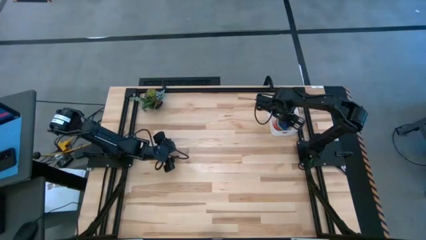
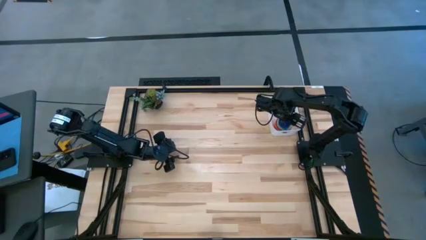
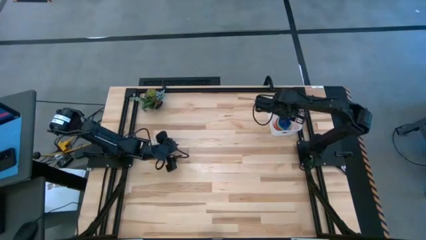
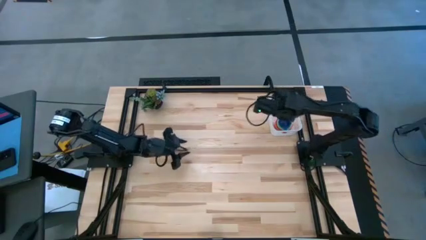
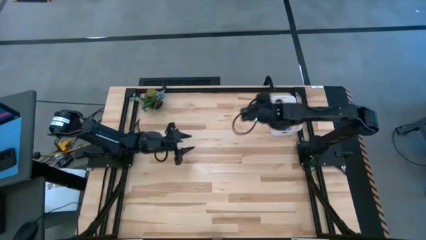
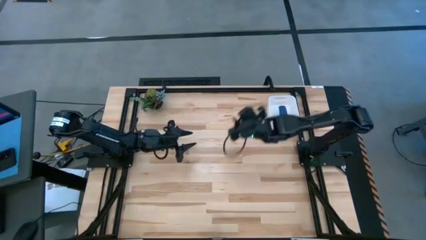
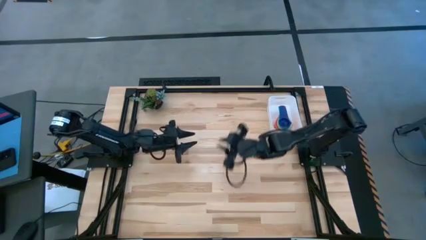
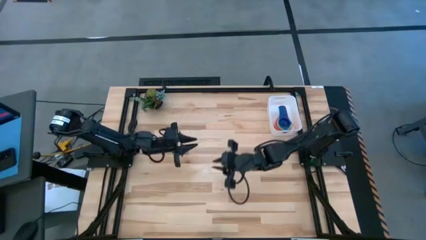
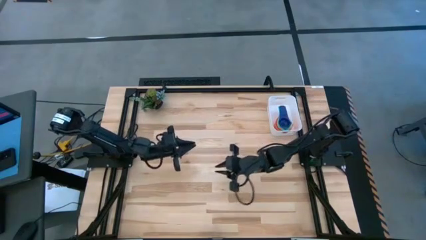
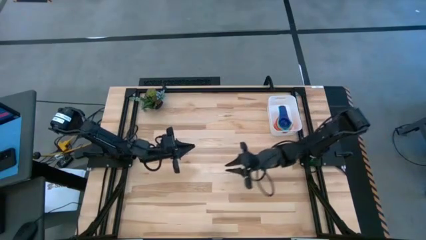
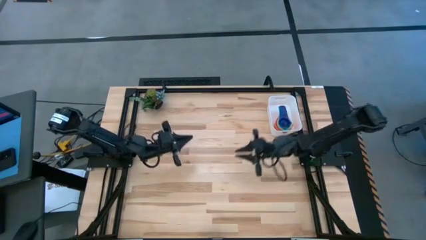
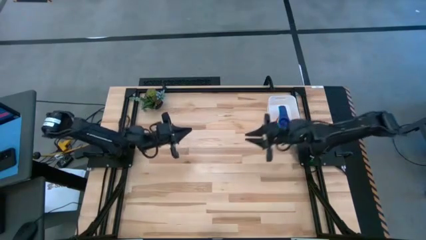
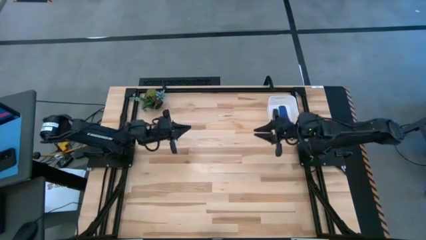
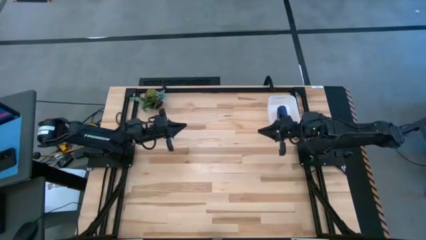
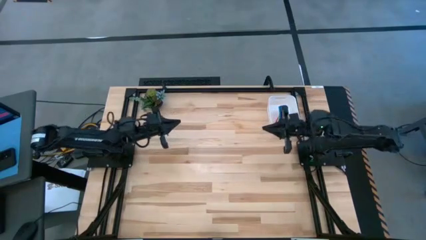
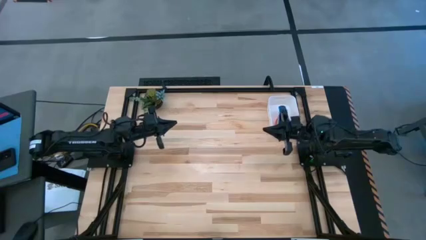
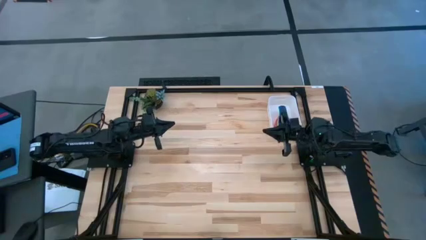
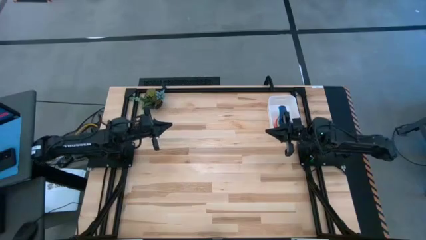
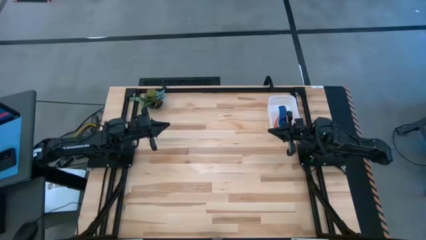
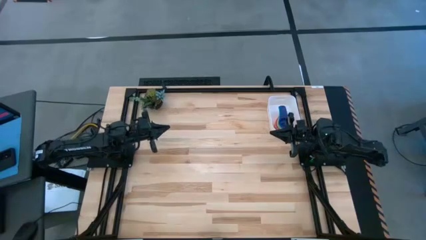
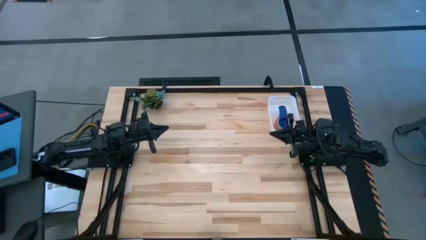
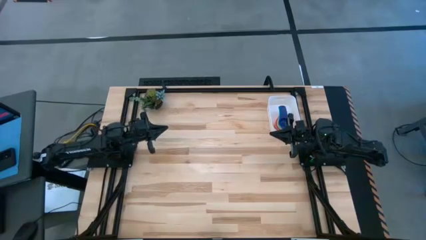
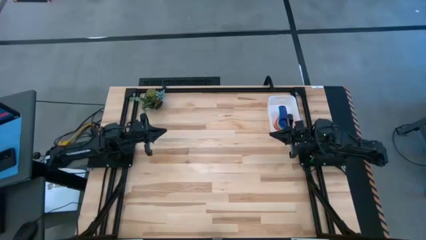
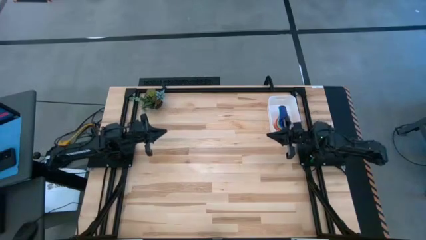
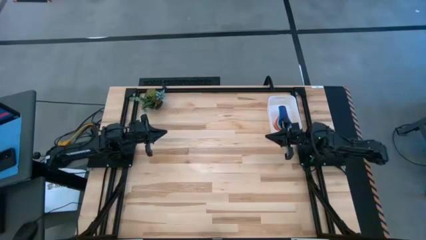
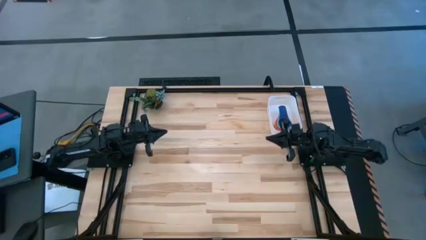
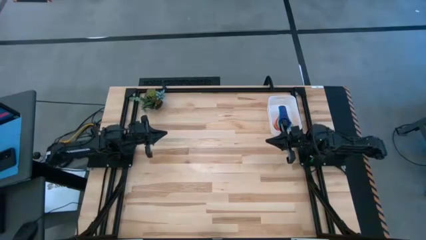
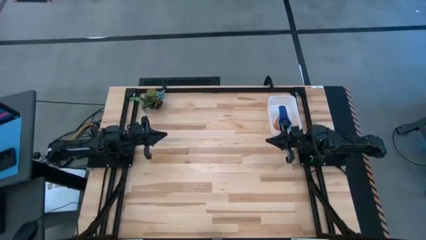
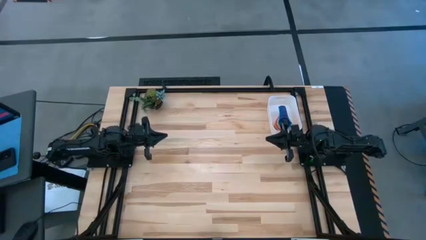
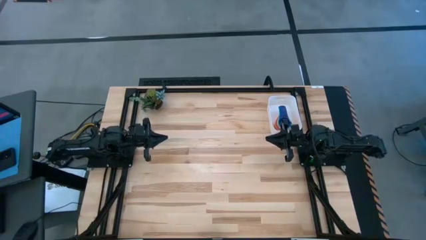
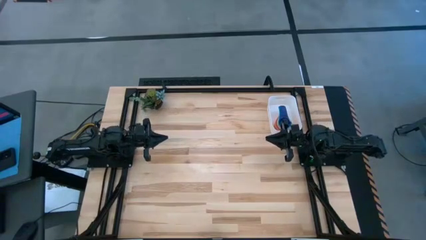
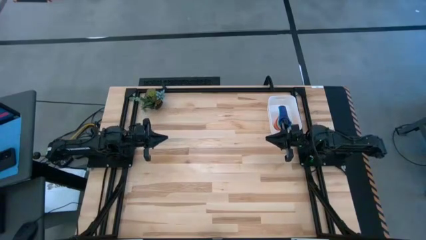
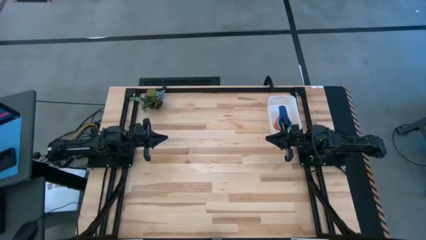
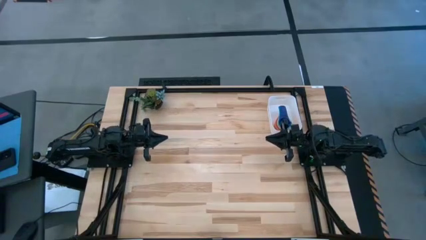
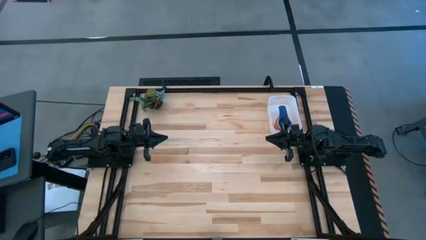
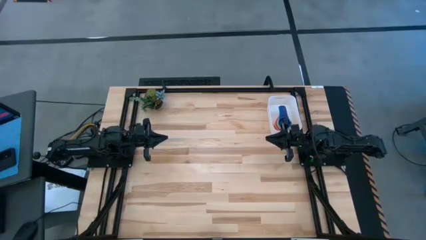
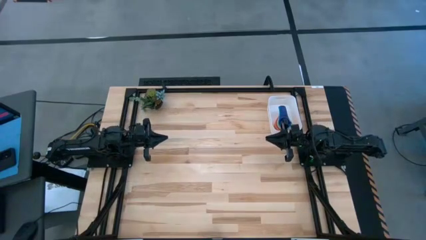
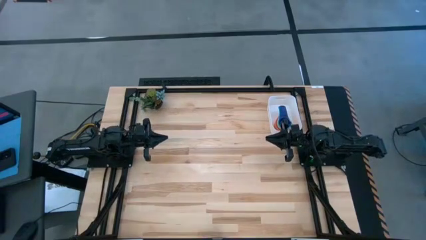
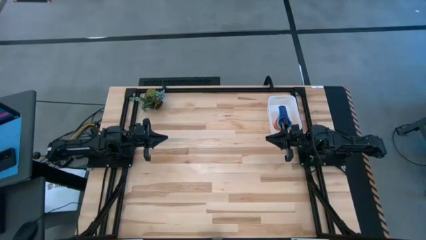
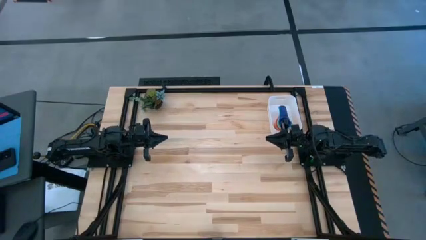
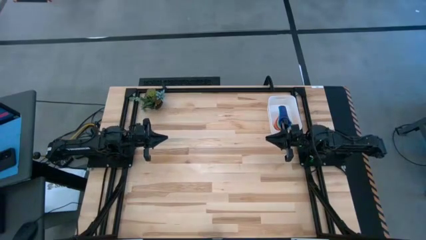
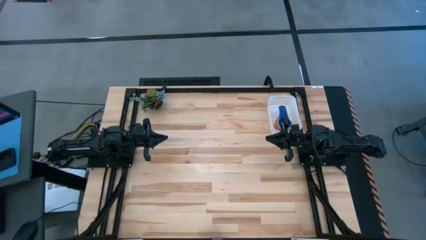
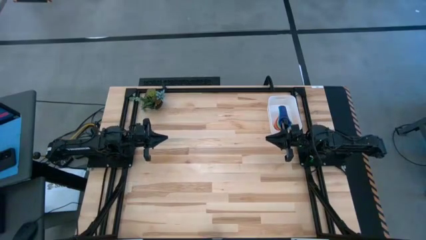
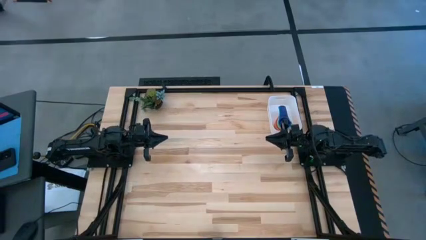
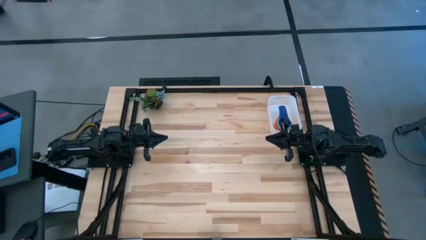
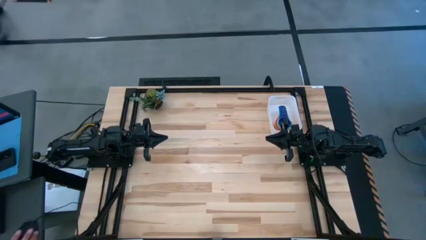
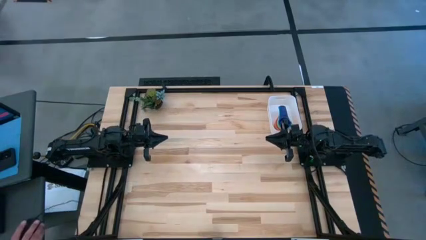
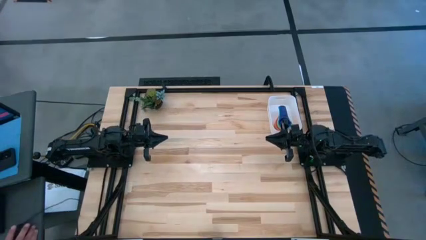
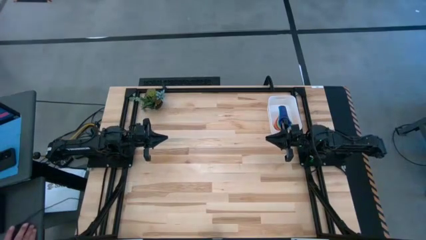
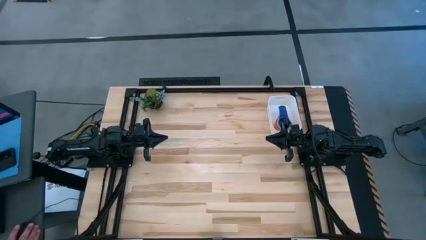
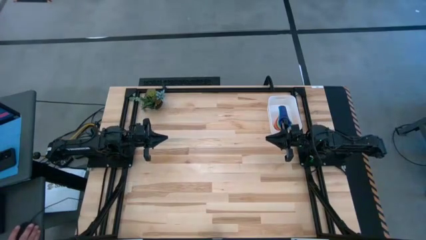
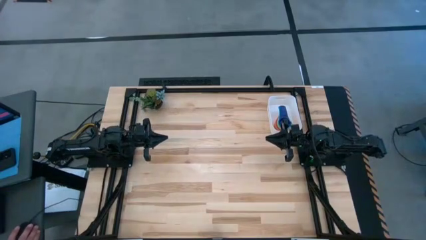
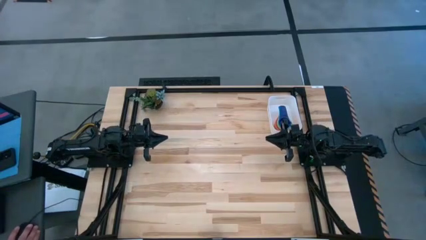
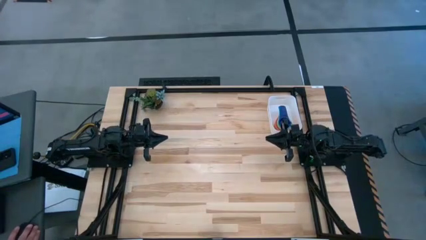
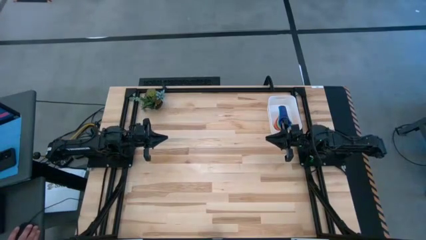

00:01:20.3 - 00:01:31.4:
Task: Nest measuring cups in basket
Return to Home Position

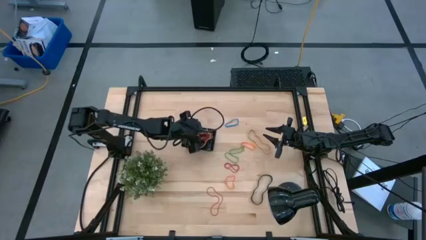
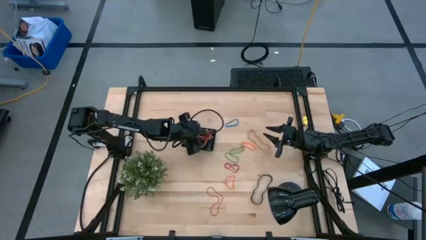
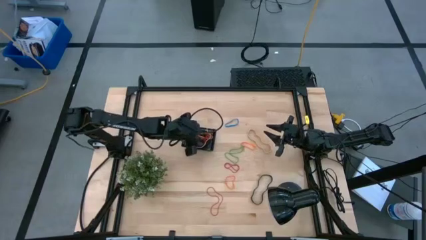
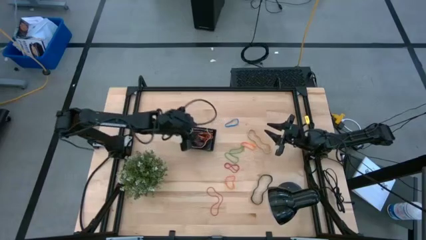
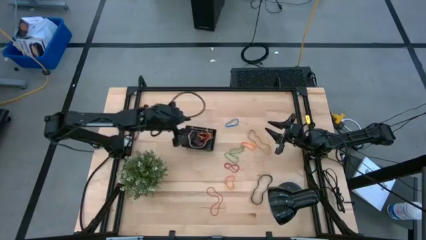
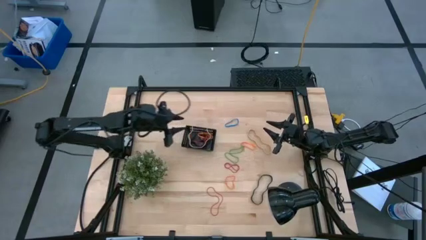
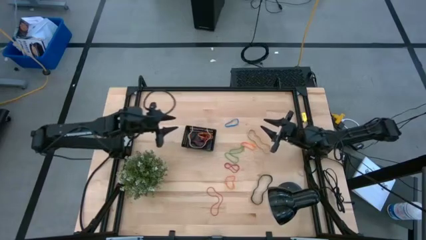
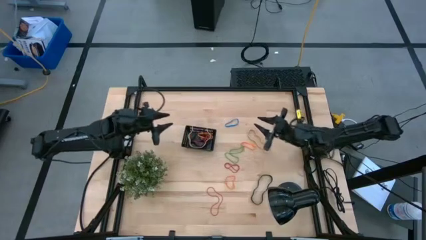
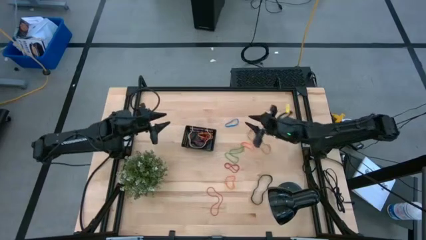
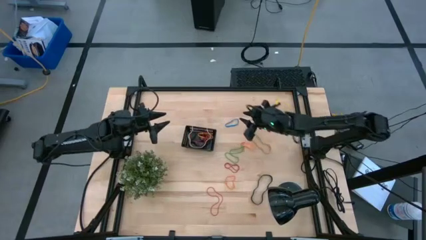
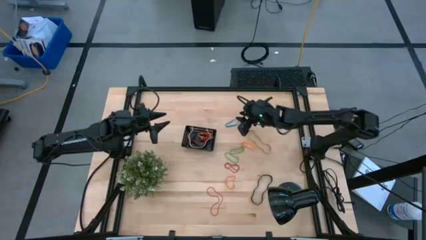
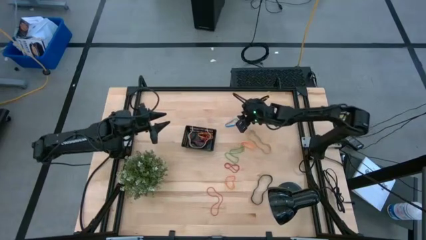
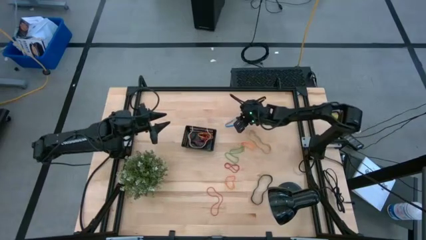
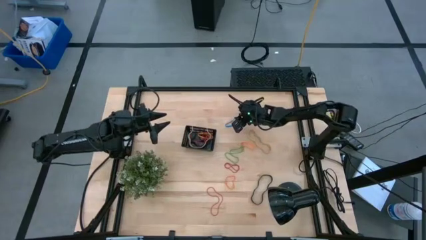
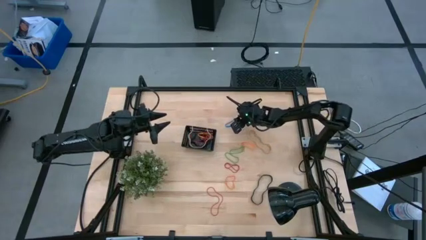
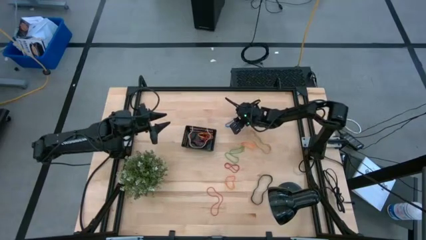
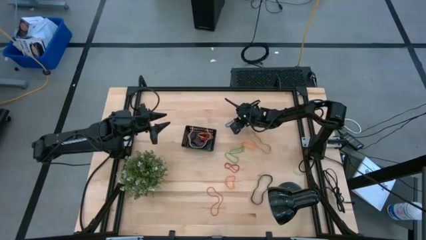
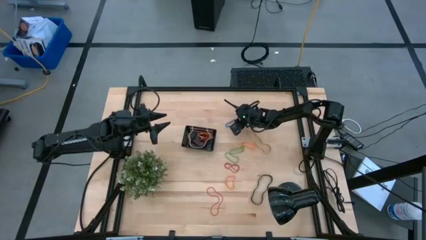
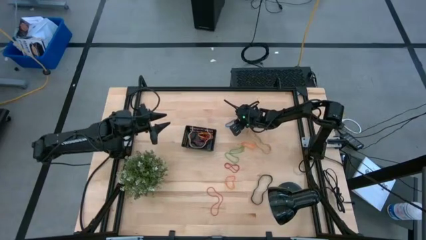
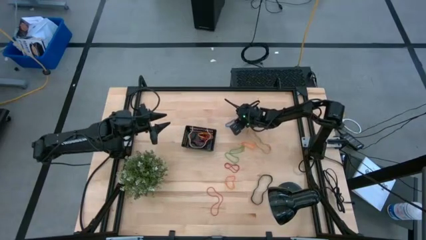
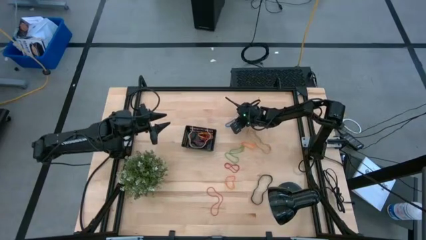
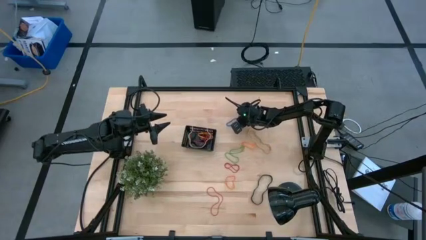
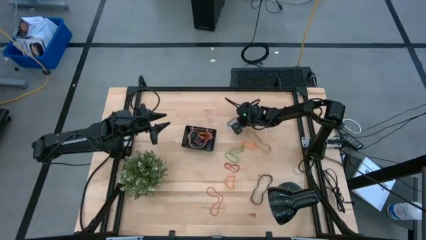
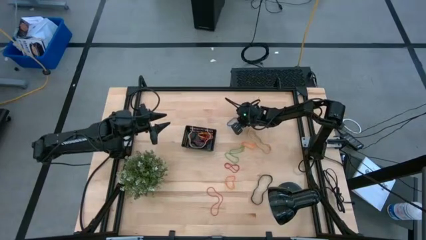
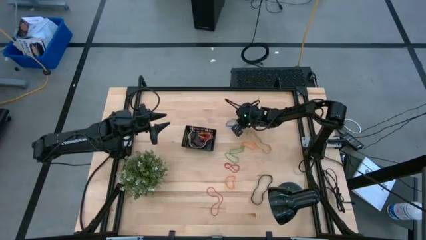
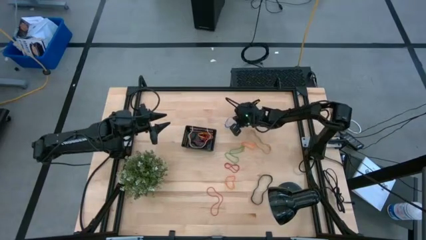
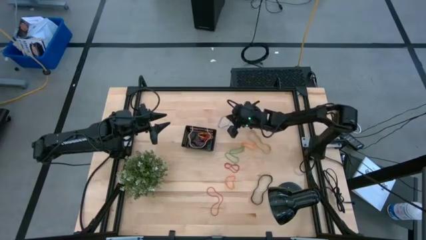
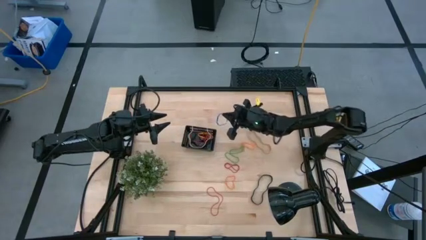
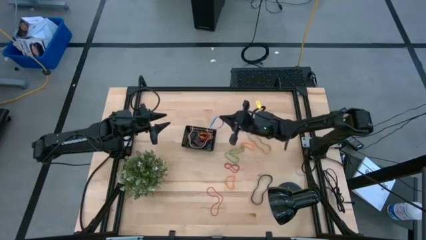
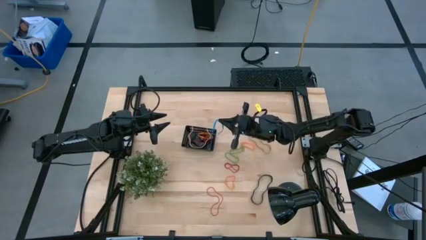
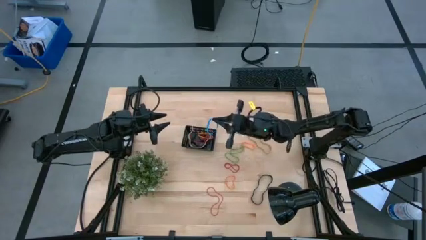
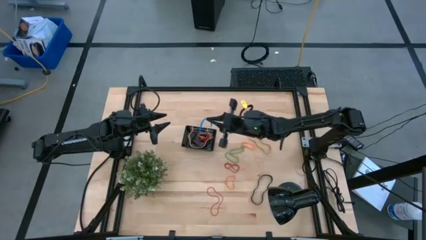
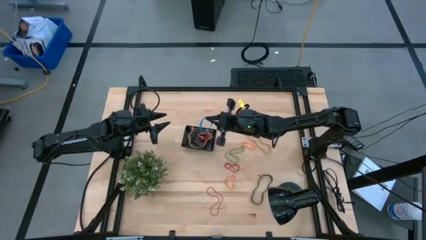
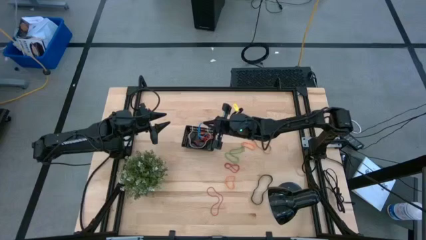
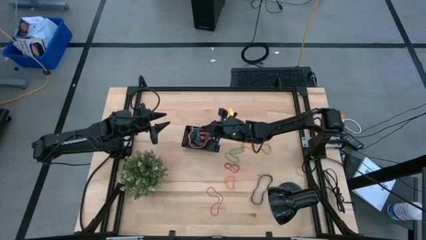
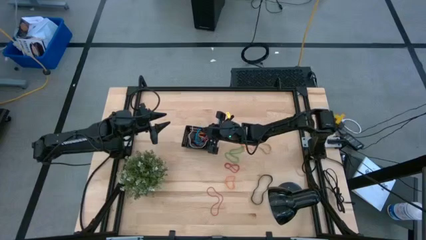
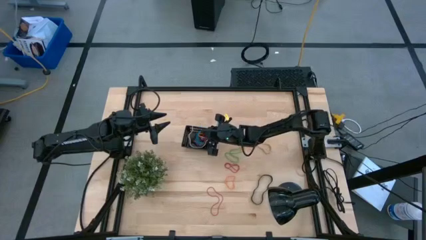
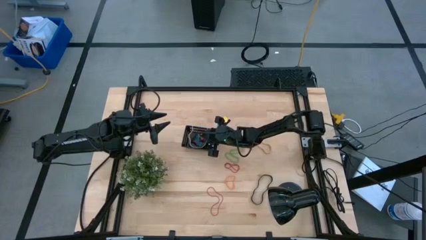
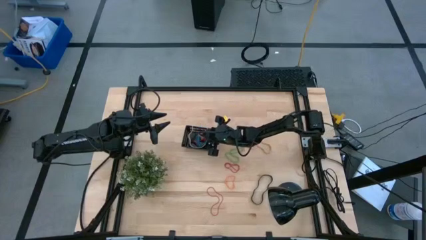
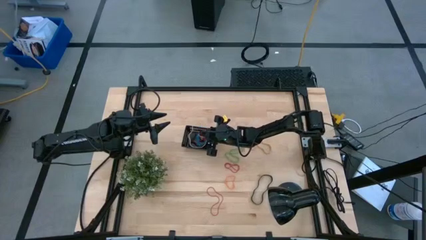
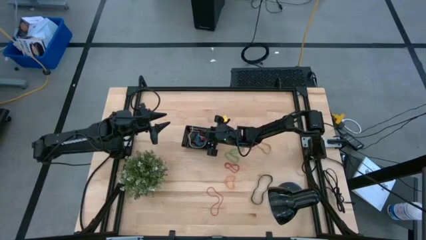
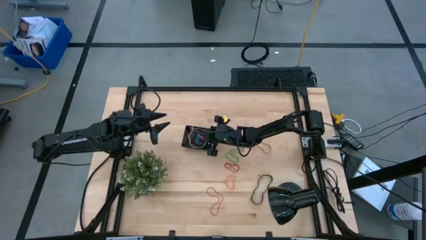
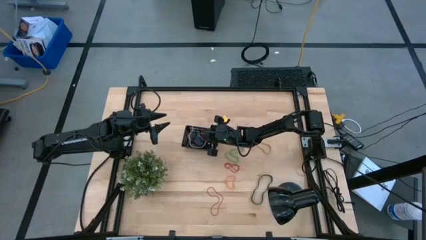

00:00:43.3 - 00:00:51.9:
Task: Pick and place rubber bands into bin
Put the blue rubber band into the black bin
